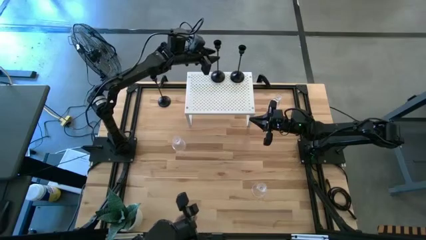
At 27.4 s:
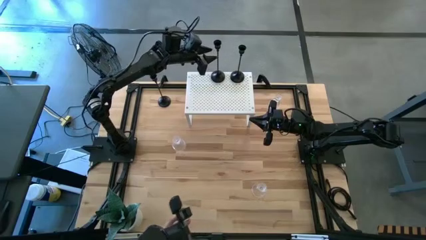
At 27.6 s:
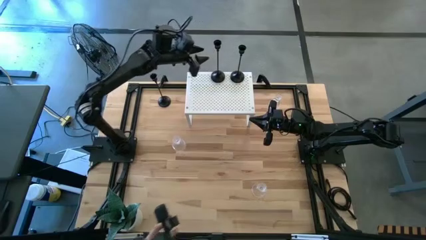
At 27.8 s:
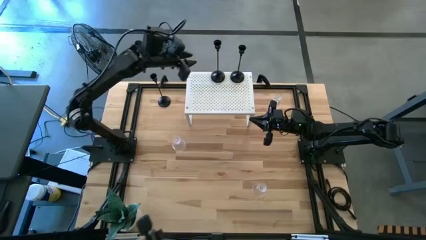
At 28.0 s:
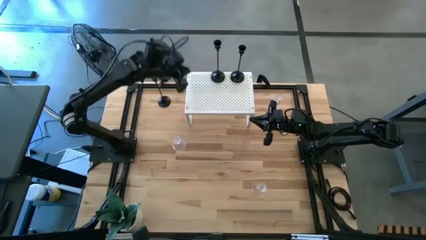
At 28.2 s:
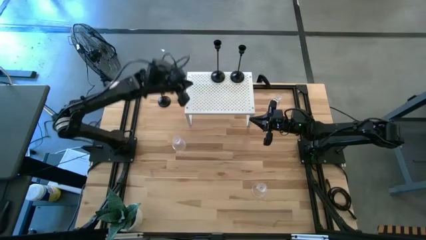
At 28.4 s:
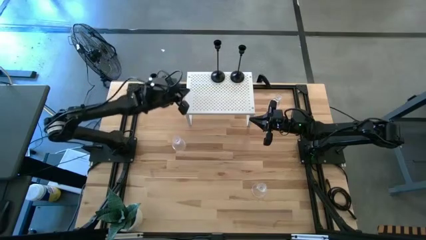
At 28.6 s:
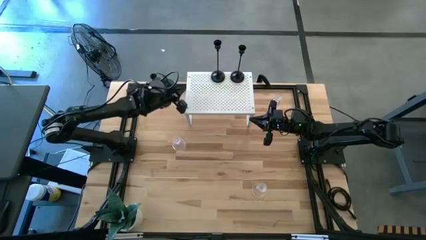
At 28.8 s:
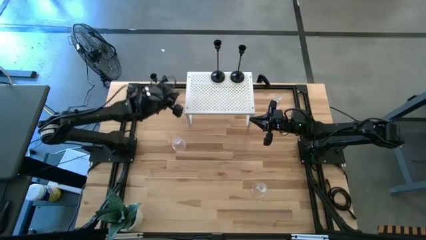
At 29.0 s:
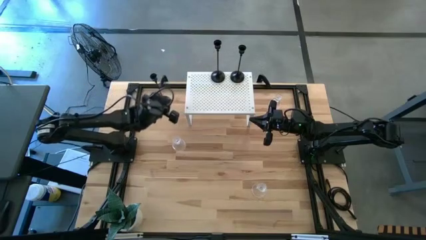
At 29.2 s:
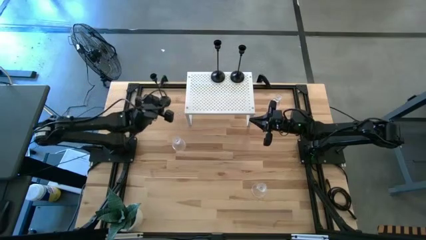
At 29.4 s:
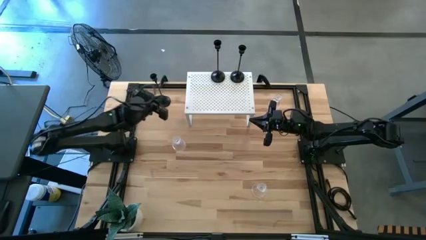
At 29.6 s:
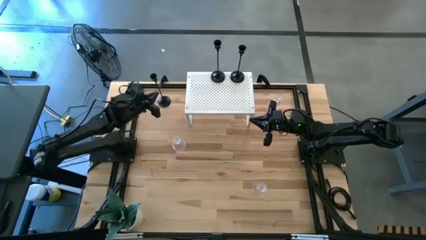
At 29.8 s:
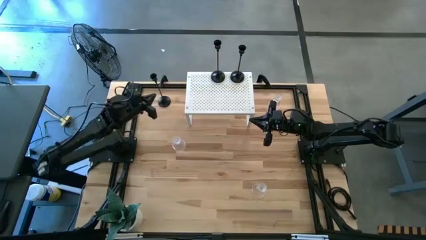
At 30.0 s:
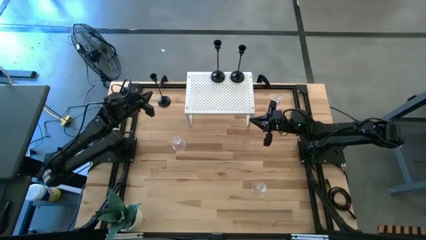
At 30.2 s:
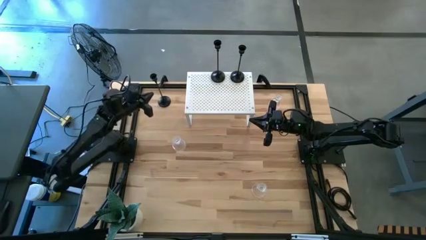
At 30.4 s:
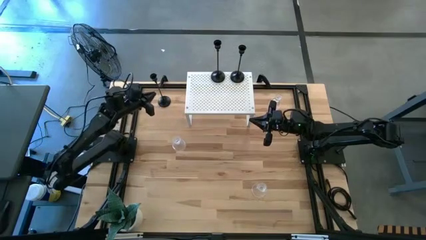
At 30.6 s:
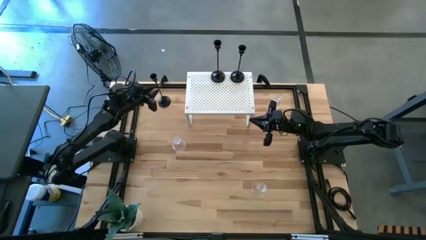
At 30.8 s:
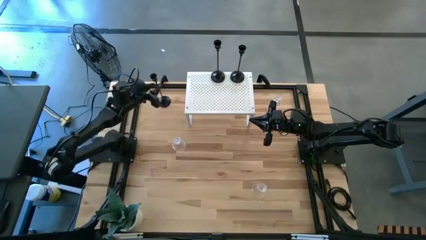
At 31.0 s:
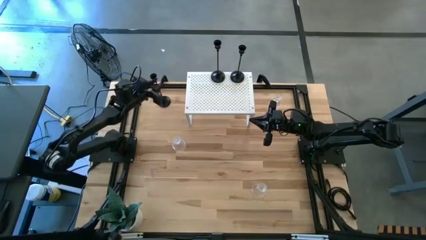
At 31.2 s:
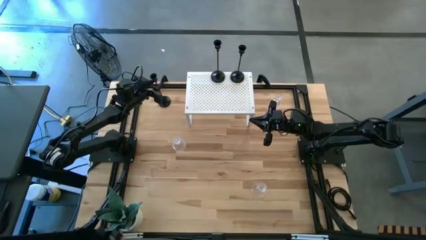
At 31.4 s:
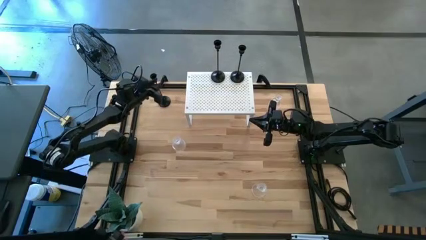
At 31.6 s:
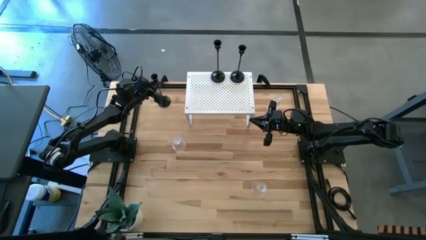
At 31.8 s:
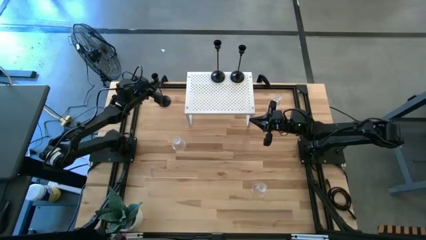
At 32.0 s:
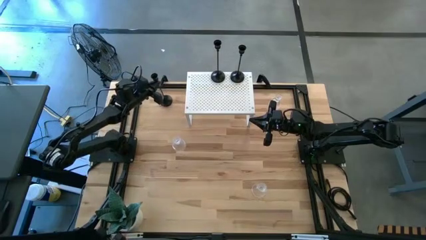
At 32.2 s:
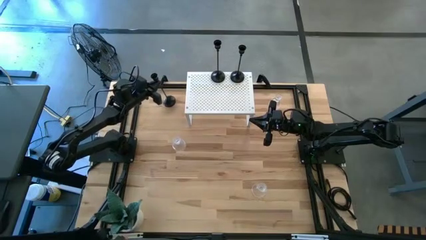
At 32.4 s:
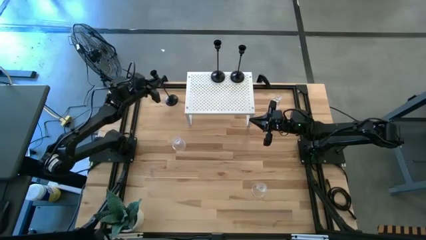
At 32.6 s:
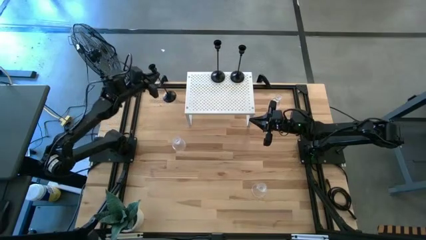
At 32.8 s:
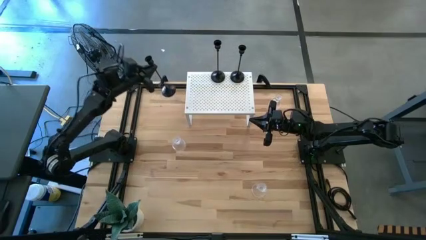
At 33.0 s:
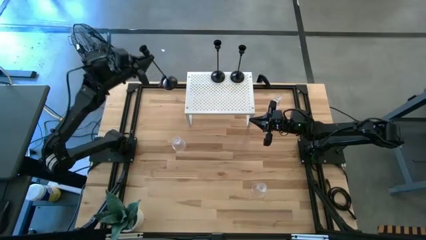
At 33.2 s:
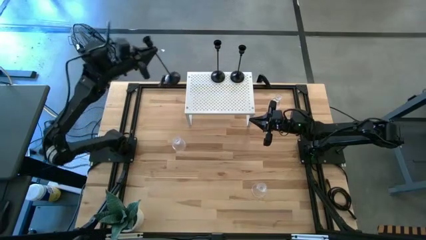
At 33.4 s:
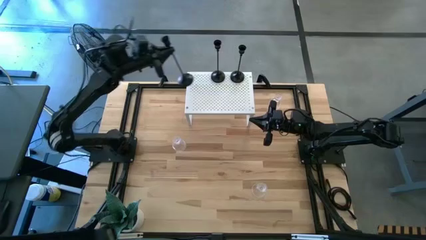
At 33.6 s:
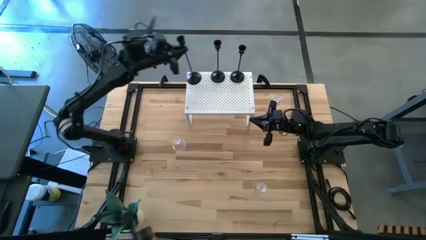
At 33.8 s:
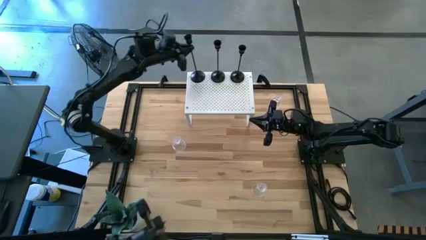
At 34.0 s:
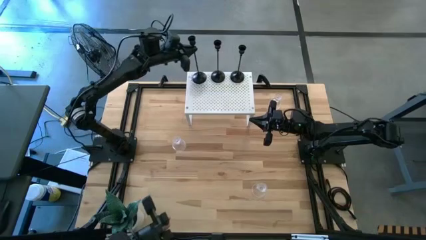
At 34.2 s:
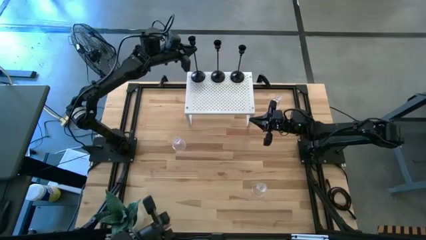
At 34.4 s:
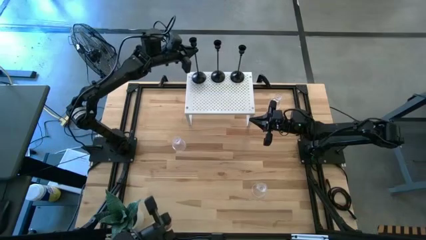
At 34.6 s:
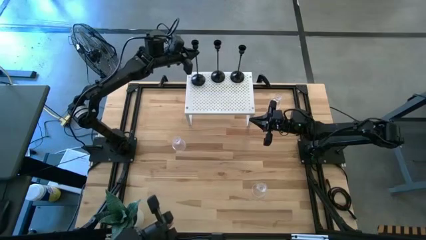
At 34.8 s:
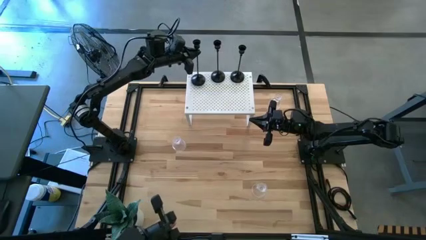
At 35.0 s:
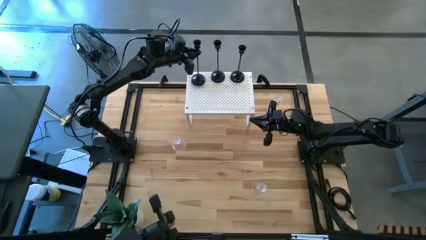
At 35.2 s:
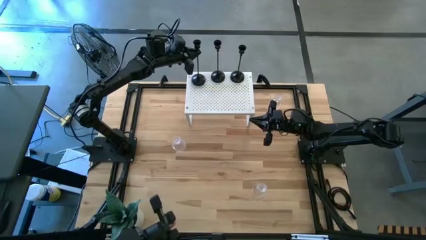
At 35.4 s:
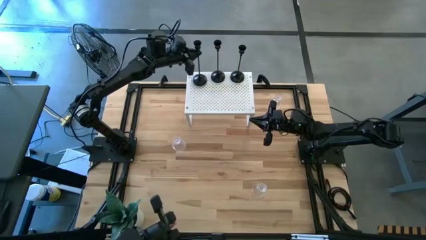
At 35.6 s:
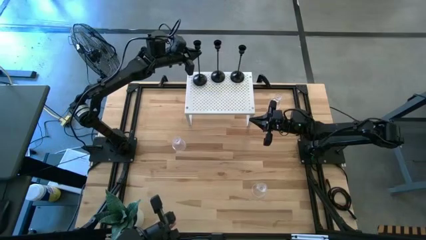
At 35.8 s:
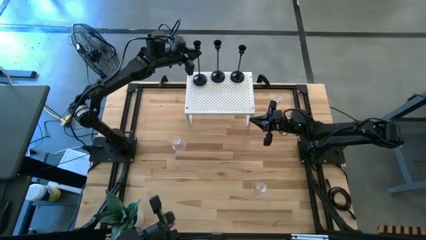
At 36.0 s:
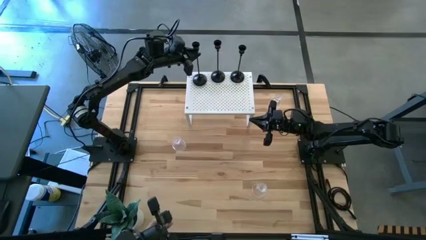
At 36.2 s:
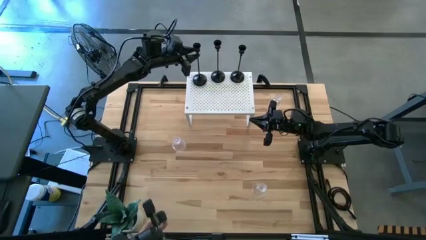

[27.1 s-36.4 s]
Task: Pick & Place candle stick holders
Put the black candle holder on the shelf

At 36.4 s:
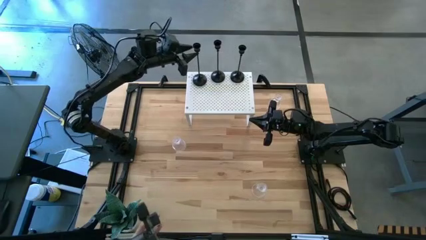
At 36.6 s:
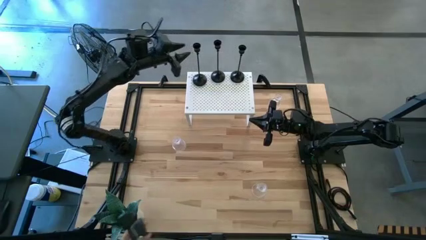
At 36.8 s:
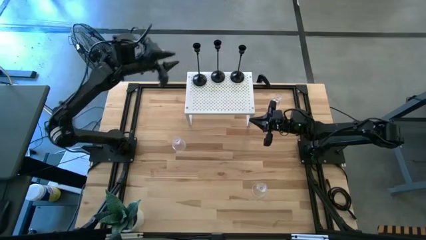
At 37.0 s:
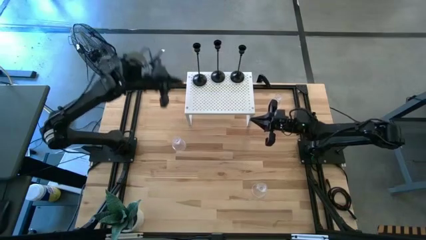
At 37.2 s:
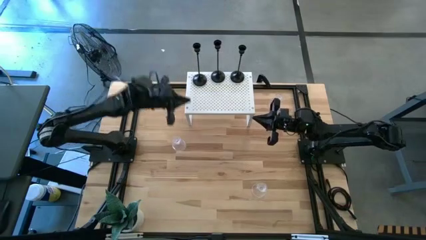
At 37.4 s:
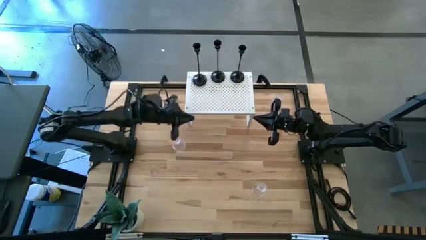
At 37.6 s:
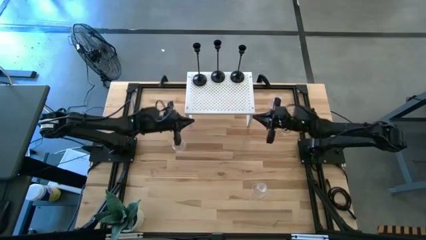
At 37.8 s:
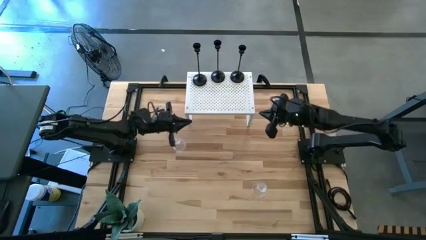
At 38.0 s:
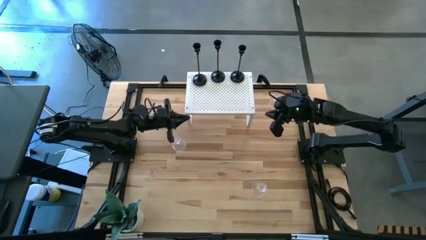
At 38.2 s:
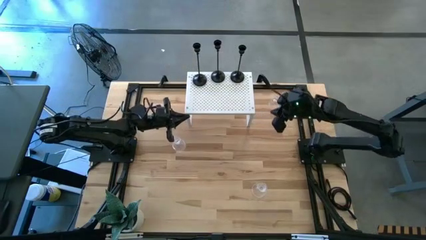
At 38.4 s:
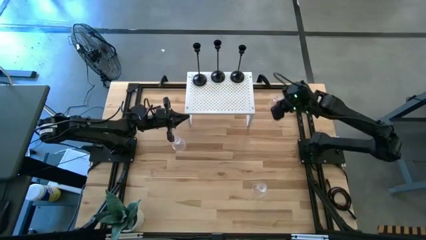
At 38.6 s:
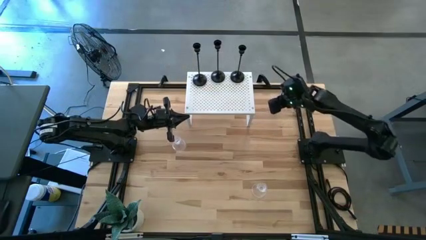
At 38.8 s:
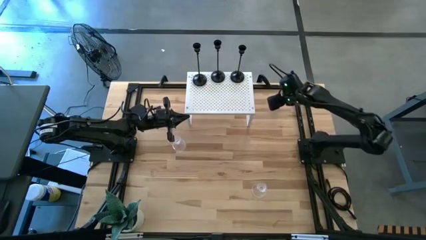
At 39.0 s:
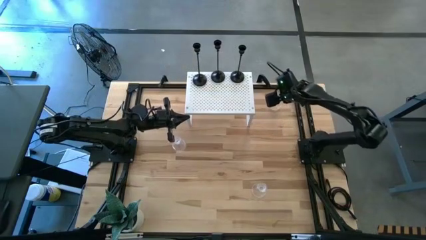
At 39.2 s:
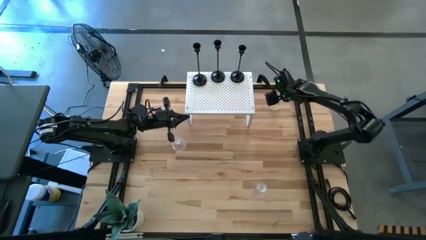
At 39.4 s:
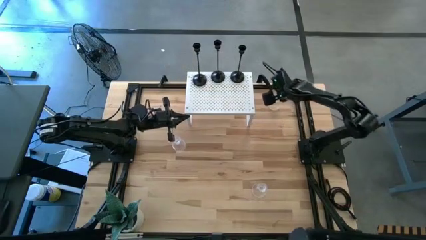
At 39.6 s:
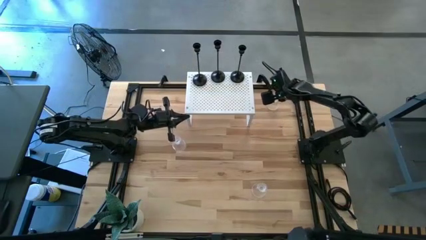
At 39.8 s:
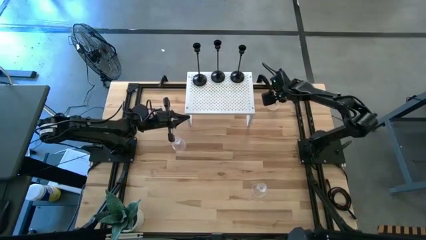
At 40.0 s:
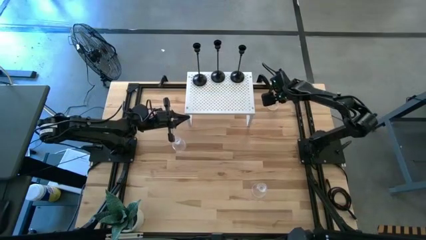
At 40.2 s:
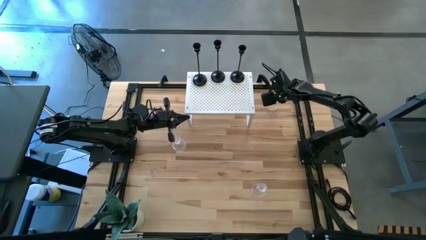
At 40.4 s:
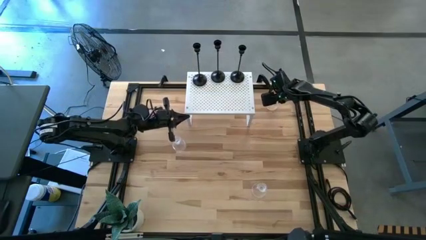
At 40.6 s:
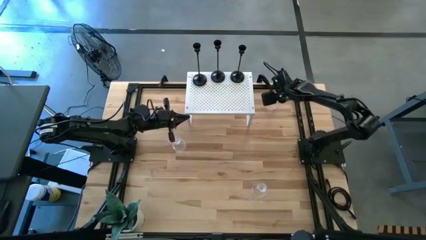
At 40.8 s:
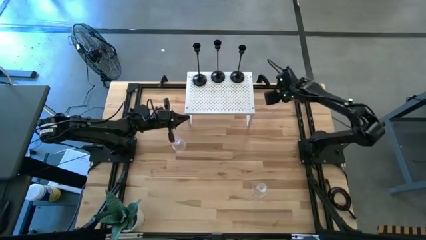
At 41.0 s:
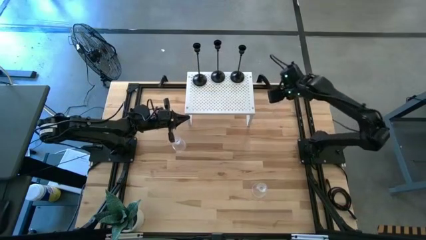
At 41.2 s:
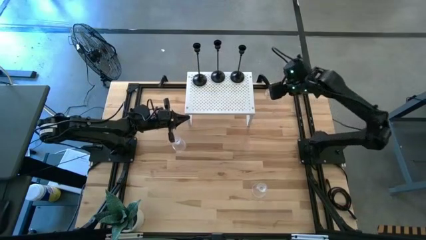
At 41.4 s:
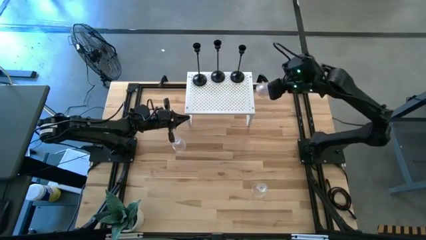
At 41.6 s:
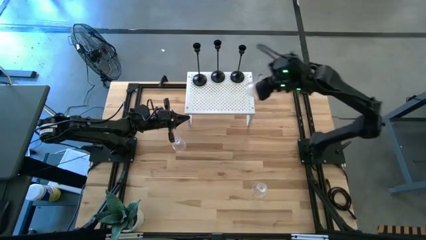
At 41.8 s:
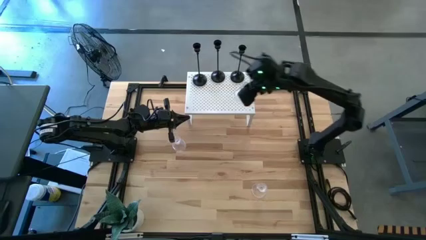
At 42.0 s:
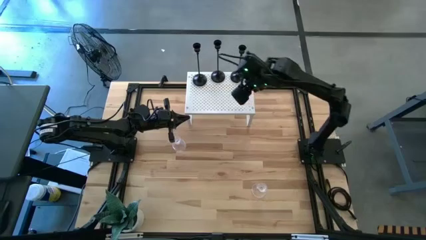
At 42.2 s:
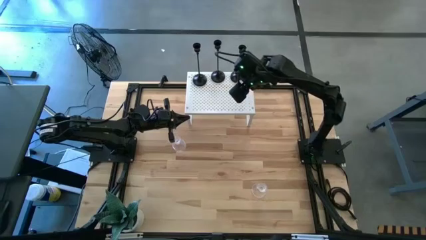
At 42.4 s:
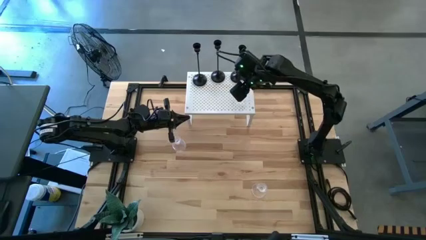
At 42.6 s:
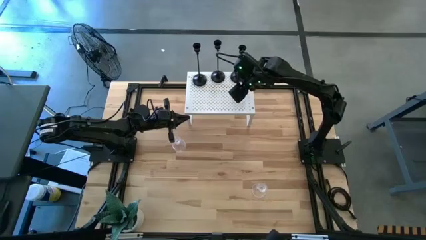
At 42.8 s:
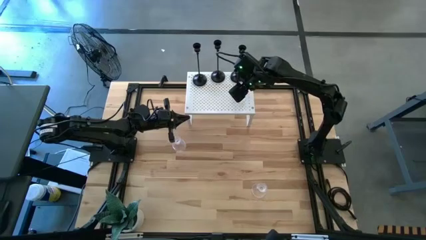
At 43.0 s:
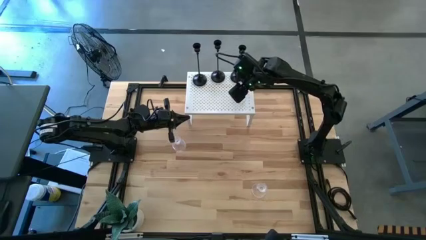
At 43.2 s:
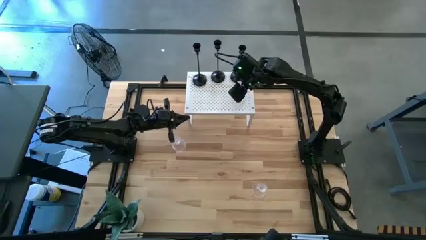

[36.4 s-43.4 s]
Put the top transparent glass candle holder aligned with the black candle holder on the shelf
